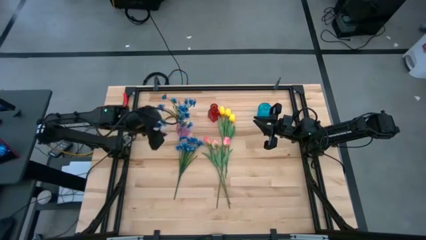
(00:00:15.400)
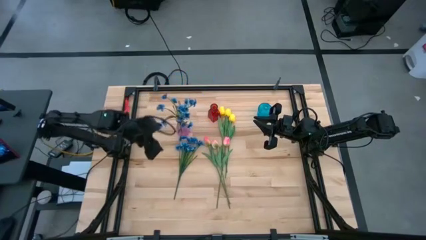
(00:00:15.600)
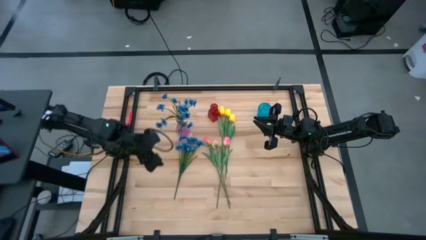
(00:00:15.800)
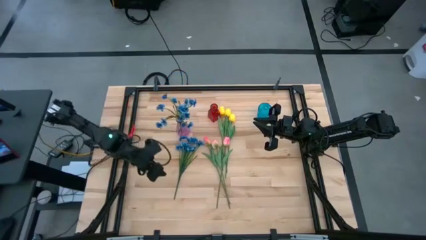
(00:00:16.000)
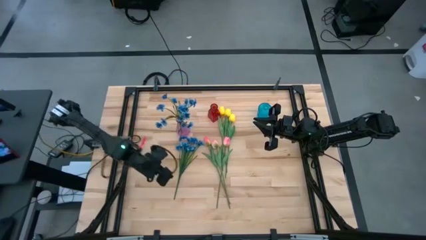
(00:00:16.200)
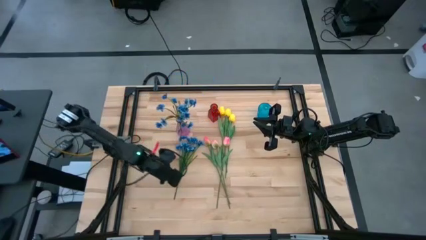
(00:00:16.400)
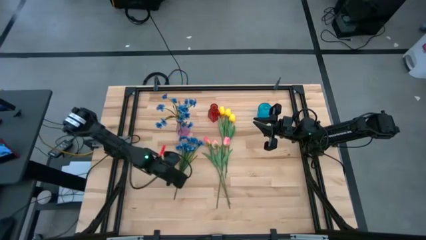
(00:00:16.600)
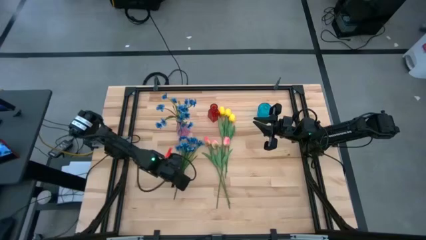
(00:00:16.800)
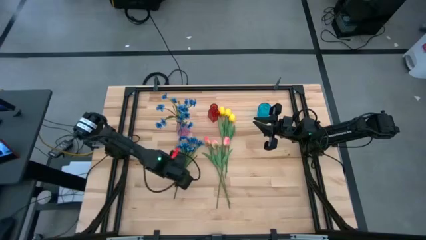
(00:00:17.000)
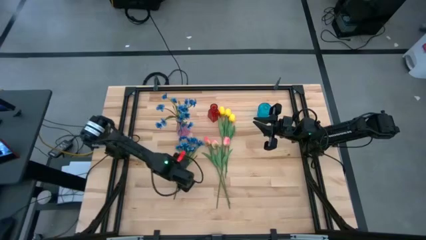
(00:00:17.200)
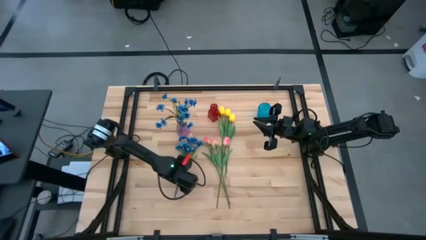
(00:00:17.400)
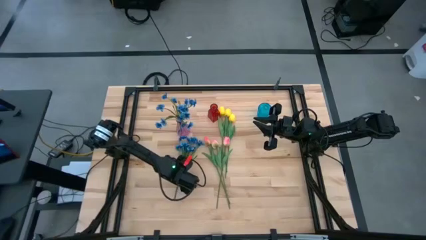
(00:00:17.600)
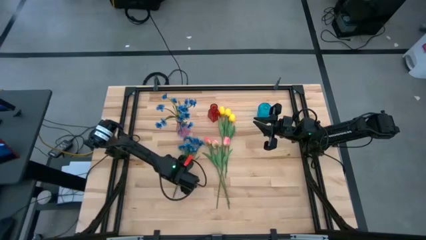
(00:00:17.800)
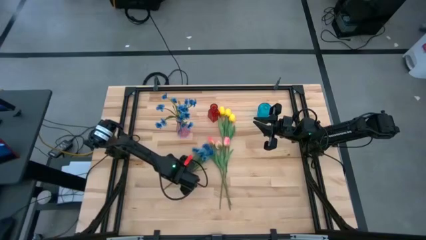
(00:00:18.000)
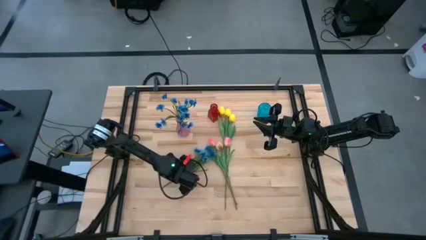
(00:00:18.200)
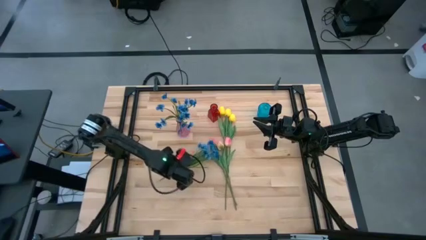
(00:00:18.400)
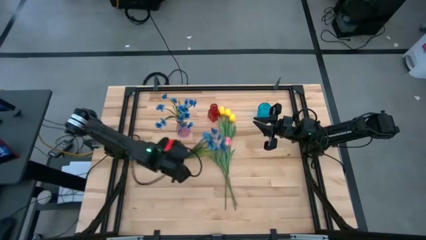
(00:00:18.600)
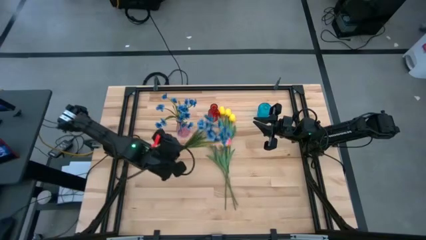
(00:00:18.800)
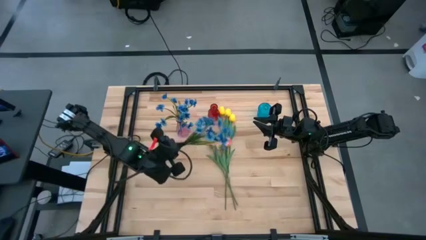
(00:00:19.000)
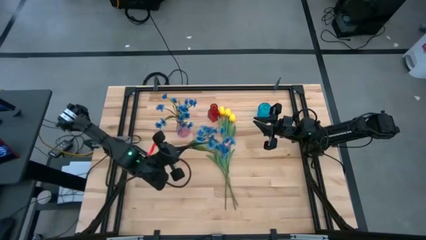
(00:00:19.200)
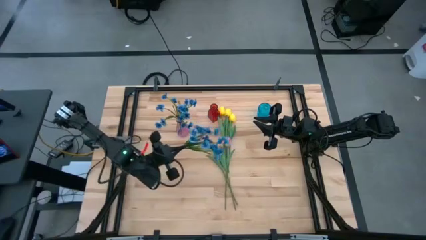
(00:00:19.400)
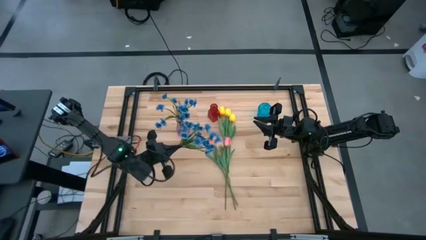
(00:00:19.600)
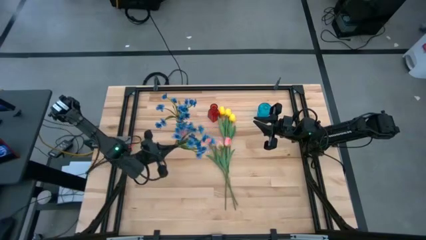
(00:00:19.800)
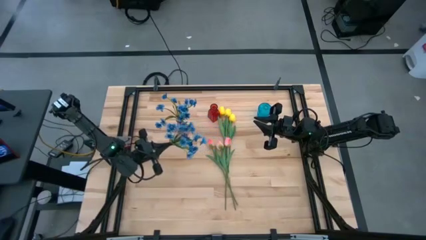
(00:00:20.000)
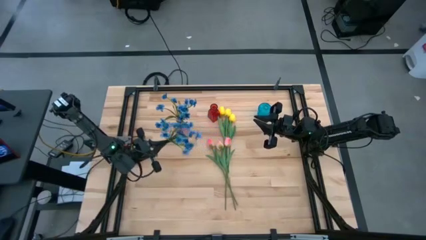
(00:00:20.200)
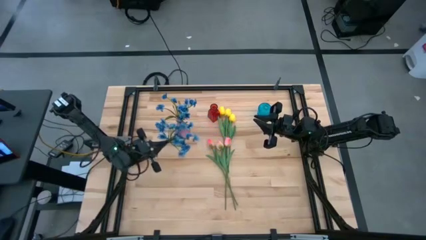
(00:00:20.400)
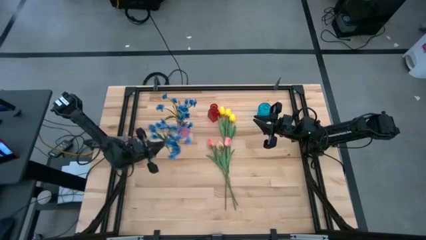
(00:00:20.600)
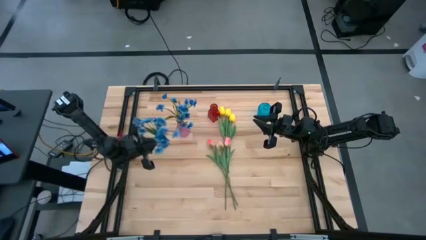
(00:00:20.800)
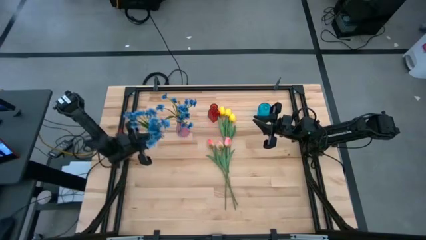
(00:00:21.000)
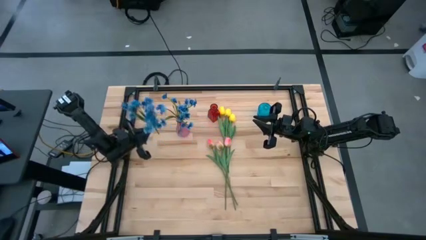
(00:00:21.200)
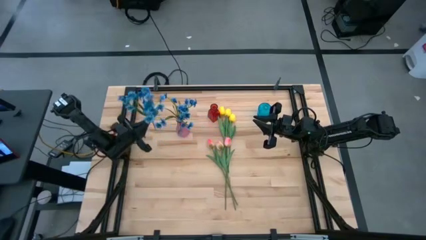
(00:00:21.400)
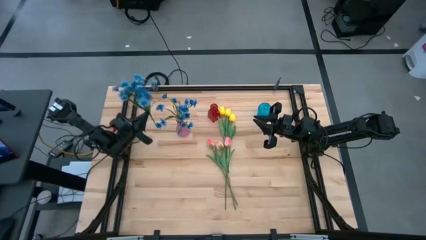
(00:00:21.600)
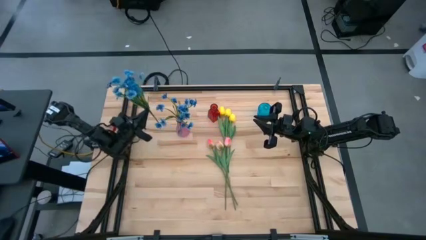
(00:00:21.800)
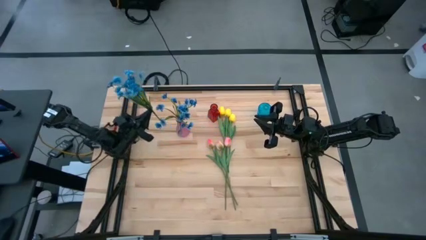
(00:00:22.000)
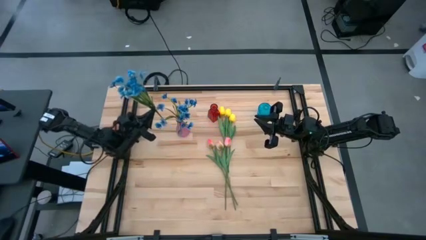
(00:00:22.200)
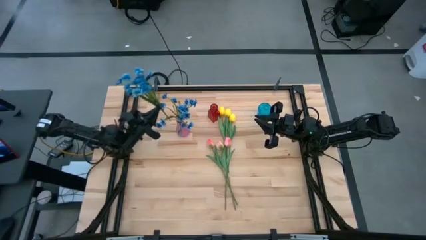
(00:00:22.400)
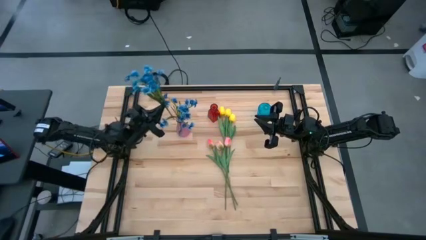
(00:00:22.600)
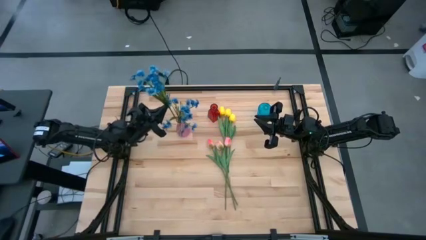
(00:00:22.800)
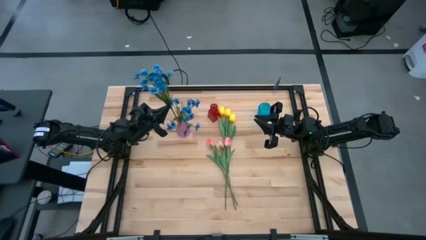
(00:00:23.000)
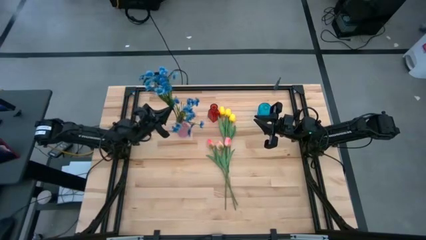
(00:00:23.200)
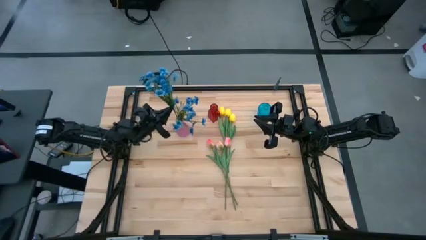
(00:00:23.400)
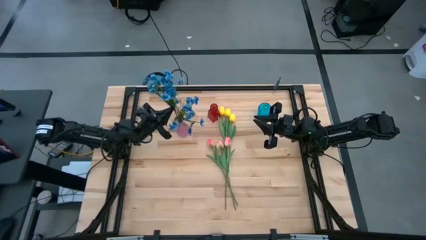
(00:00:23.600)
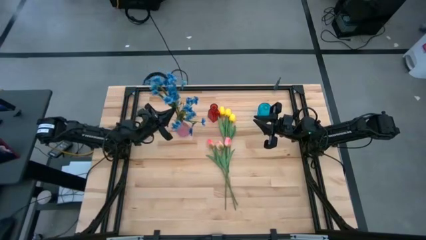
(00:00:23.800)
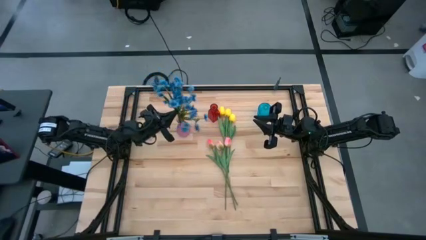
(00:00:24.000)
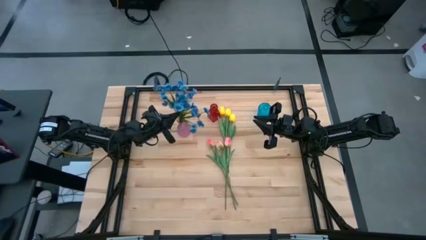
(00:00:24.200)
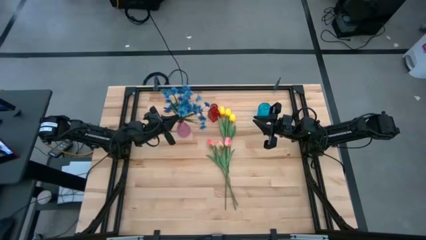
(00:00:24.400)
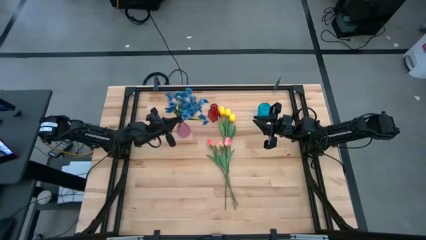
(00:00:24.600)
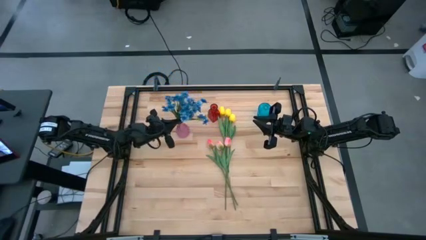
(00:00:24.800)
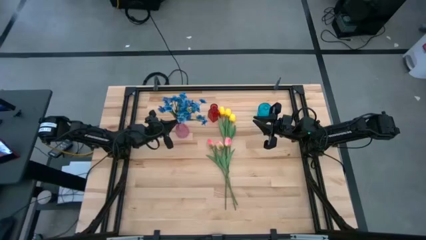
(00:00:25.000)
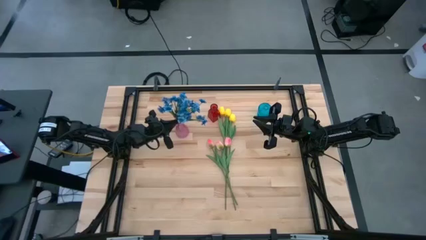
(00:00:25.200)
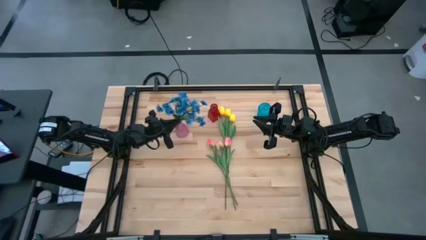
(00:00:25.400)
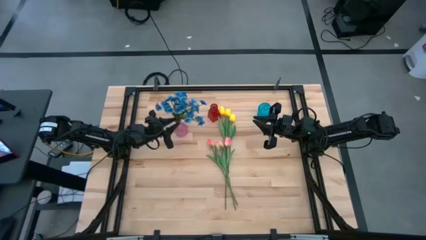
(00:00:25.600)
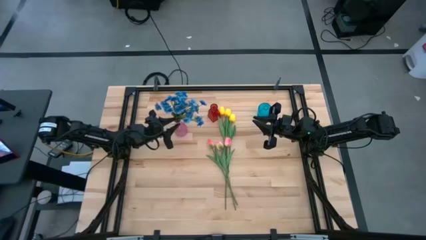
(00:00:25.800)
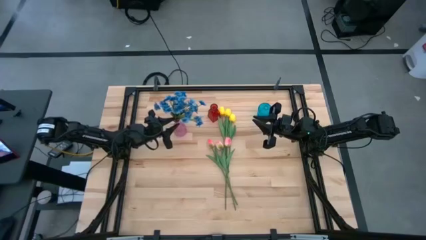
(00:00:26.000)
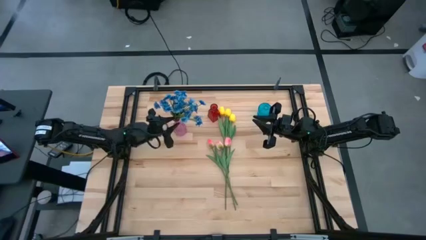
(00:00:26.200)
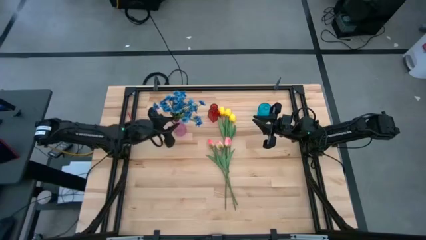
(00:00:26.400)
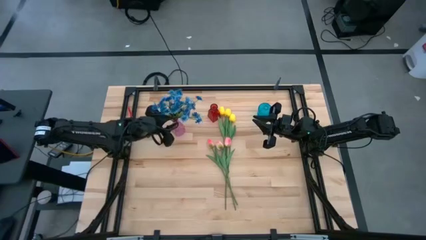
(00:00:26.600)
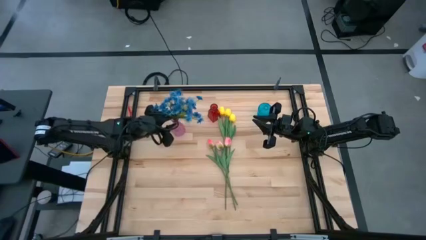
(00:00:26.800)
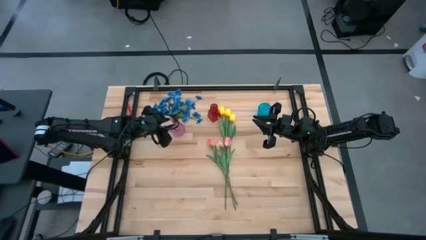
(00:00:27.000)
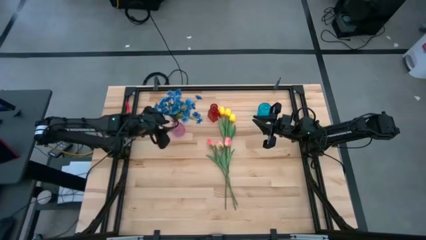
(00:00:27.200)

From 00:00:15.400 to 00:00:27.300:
Task: Sort flowers into vase by color
Put the blue flowers into the pink vase

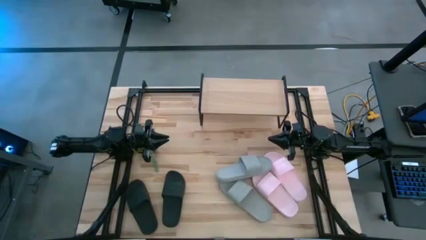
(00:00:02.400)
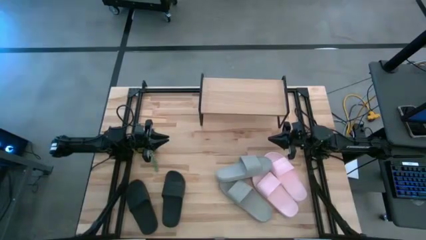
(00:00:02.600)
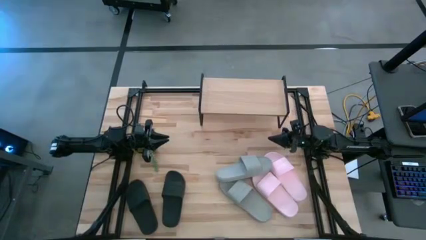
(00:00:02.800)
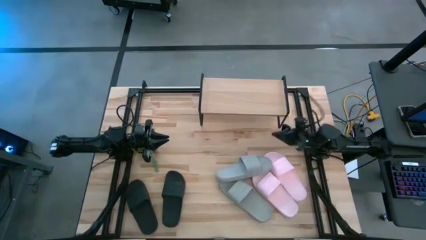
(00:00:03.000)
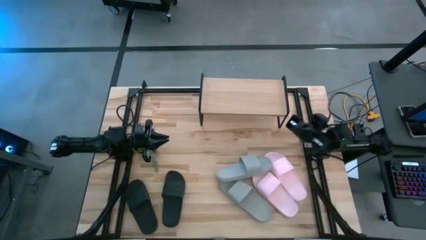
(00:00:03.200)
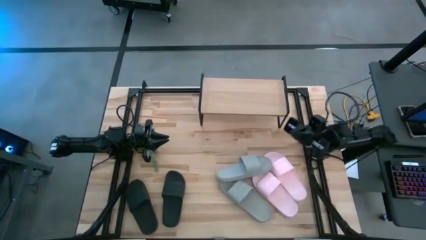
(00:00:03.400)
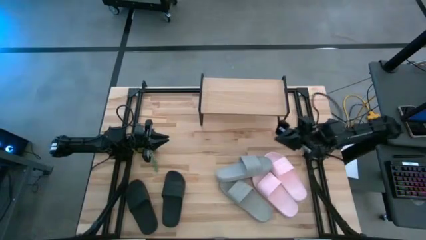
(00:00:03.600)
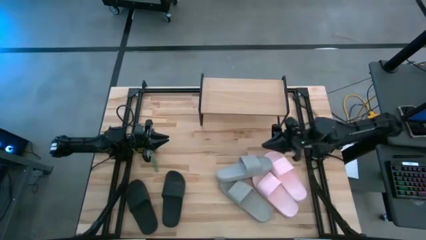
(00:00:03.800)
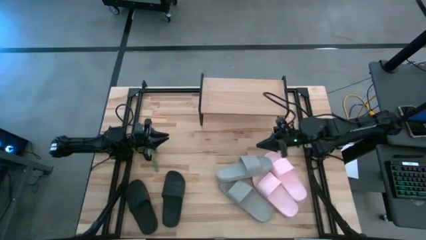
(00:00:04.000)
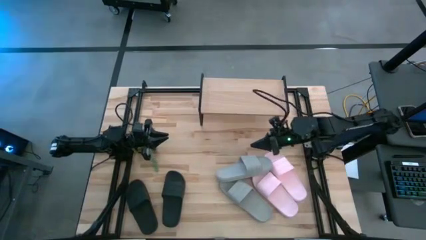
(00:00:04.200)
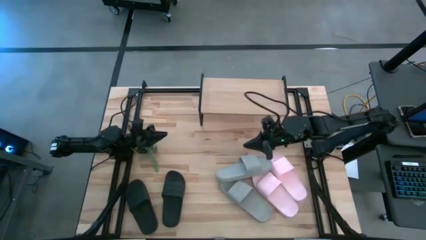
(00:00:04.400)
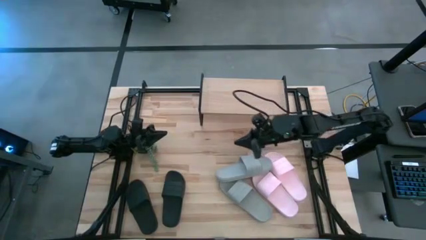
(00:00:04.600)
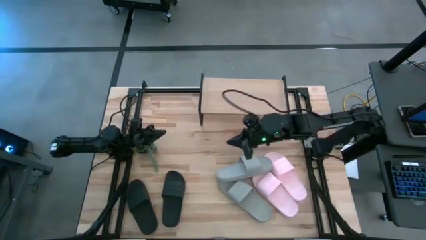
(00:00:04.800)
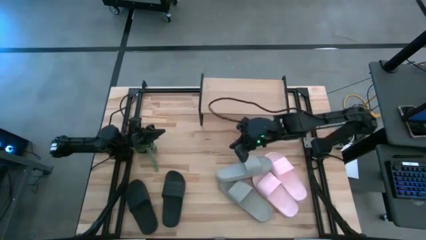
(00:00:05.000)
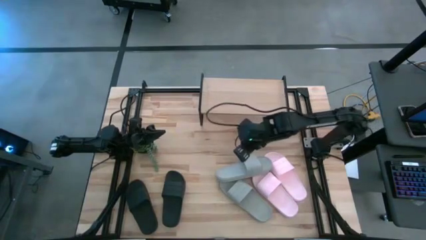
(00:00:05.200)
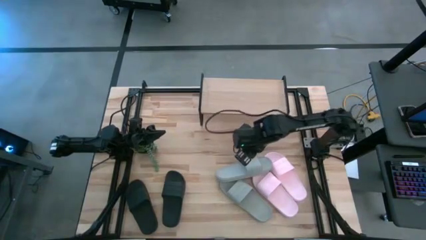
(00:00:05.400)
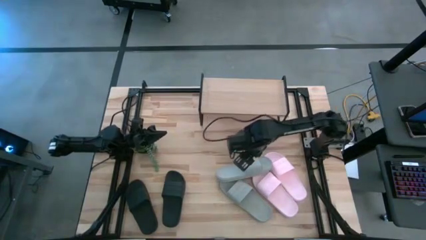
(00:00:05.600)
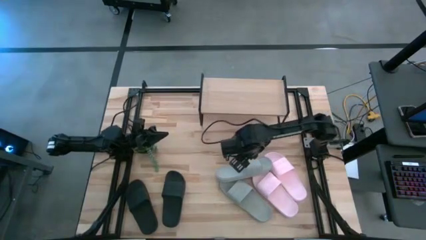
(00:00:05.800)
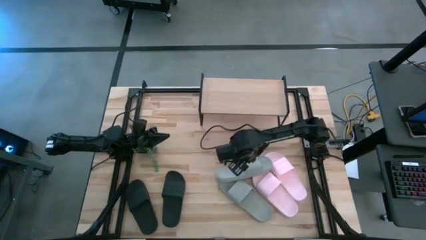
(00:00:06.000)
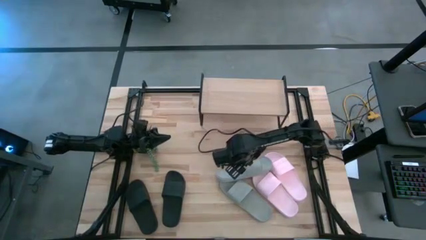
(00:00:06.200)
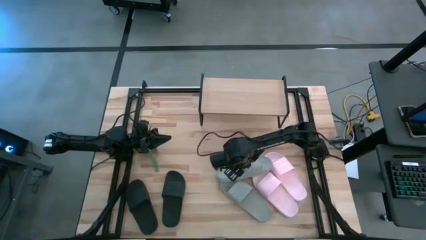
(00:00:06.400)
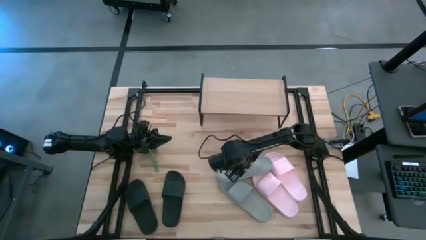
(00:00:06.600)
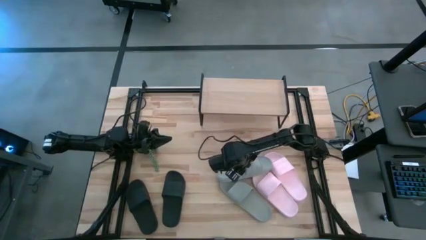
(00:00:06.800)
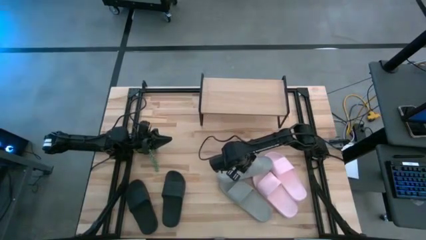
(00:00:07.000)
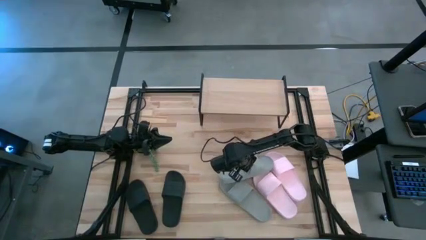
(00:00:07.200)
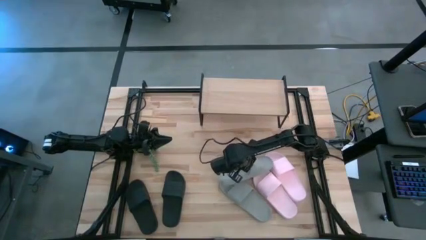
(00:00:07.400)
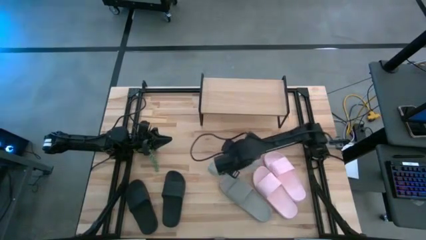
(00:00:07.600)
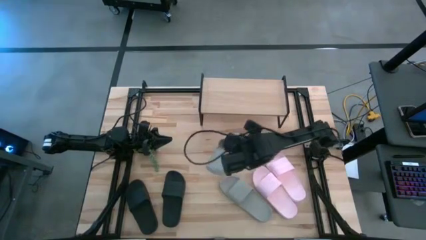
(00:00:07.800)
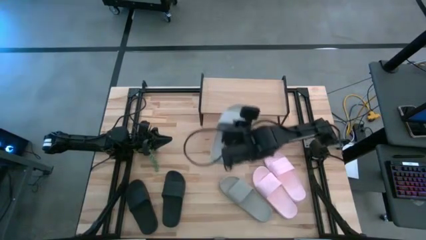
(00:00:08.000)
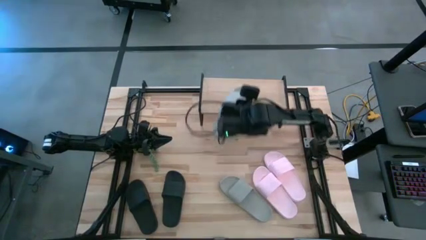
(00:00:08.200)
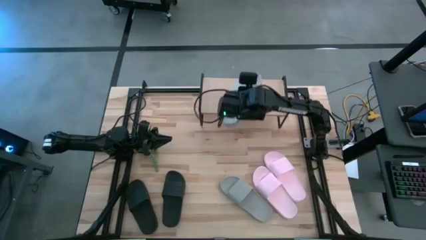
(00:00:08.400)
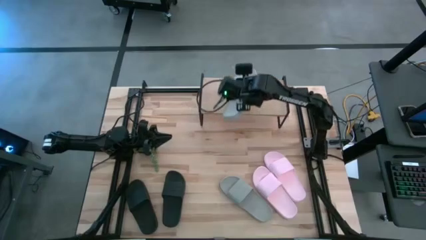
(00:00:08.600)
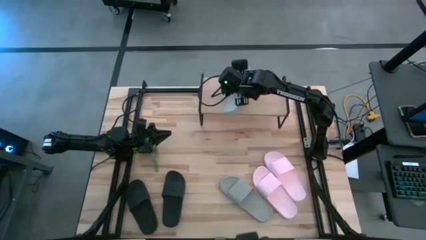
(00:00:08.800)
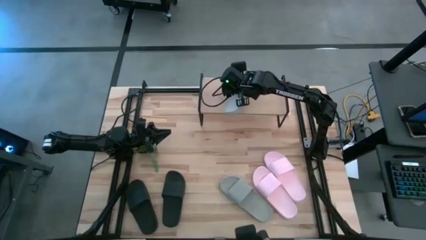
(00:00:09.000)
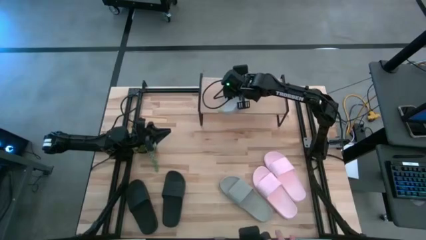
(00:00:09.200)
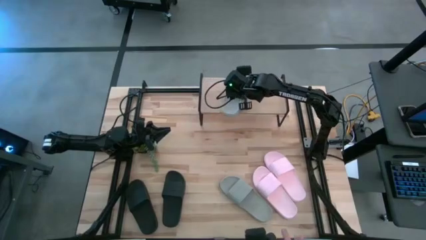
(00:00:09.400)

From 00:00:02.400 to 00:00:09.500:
Task: Pick and place slides into the shelf
Put the gray left slipper on the shelf
